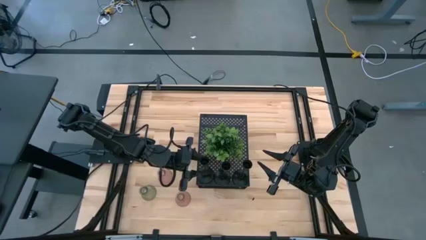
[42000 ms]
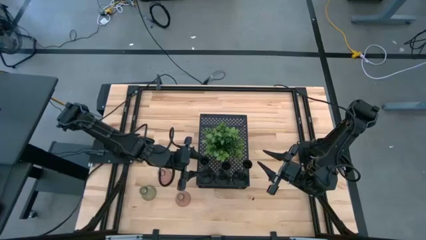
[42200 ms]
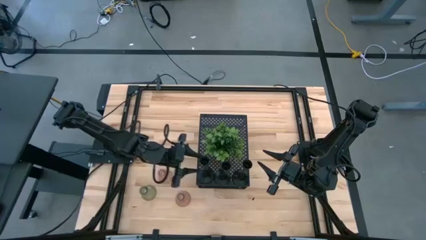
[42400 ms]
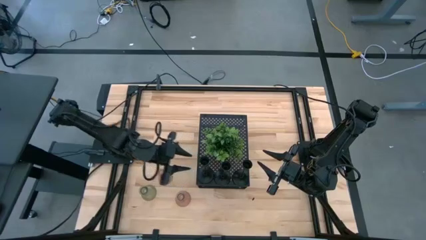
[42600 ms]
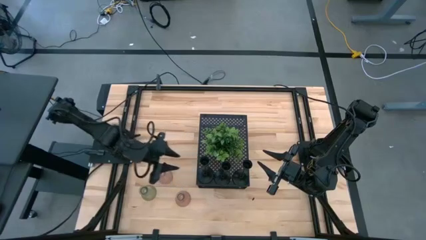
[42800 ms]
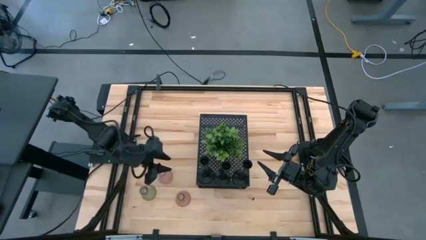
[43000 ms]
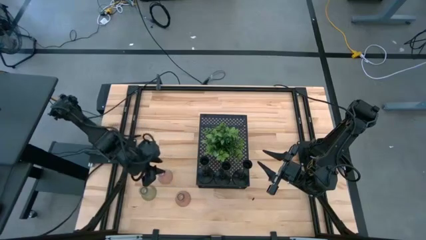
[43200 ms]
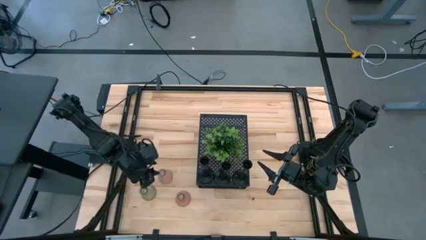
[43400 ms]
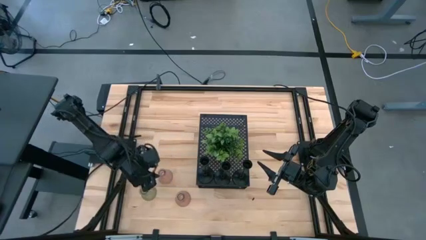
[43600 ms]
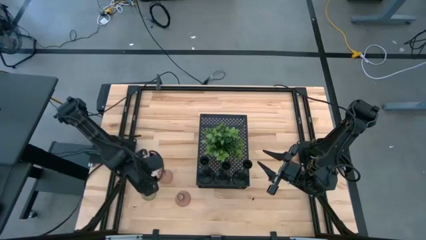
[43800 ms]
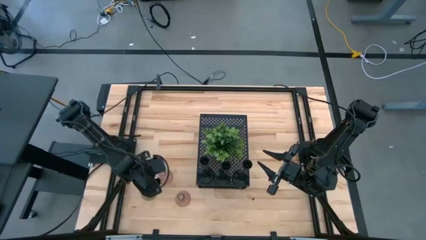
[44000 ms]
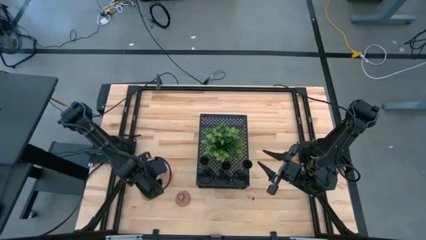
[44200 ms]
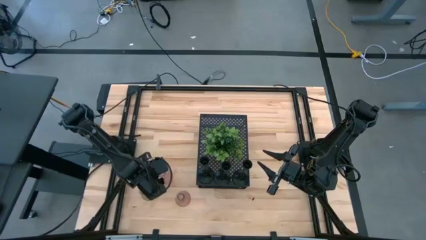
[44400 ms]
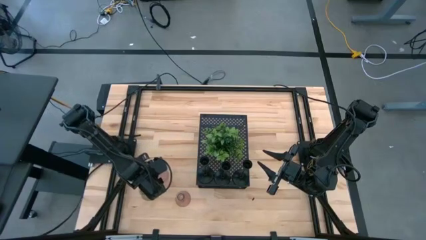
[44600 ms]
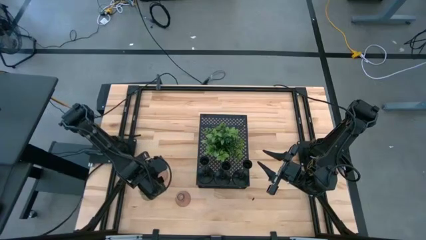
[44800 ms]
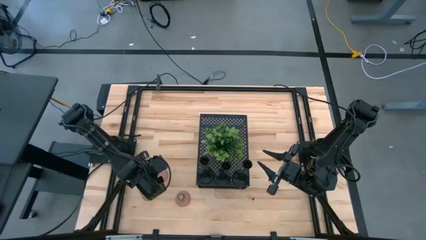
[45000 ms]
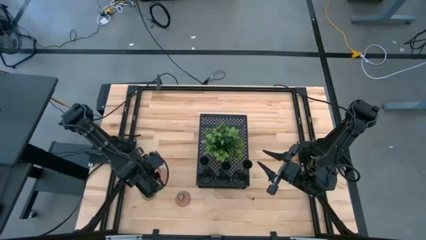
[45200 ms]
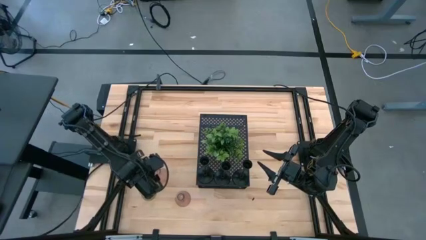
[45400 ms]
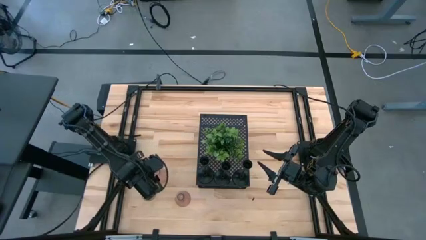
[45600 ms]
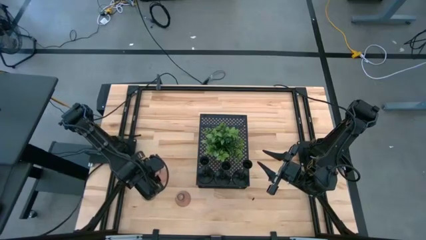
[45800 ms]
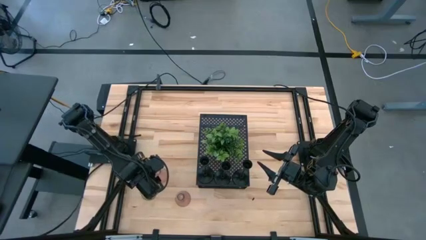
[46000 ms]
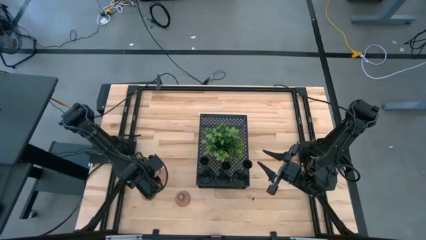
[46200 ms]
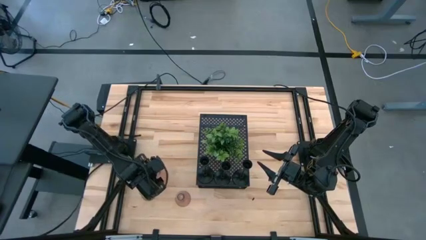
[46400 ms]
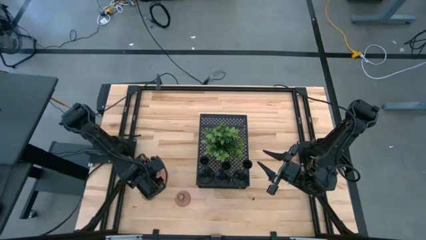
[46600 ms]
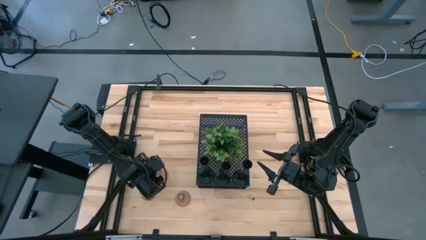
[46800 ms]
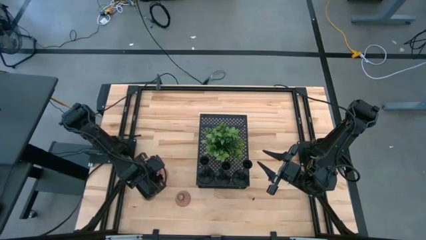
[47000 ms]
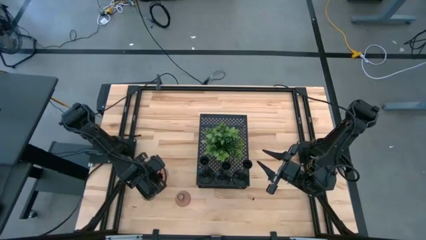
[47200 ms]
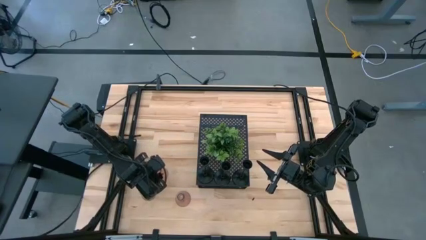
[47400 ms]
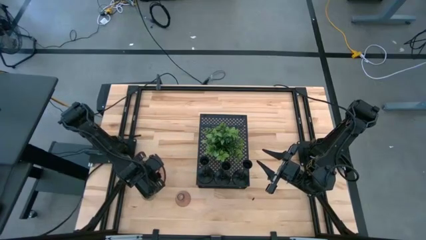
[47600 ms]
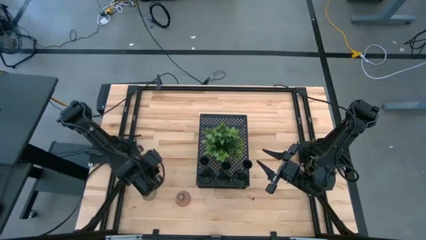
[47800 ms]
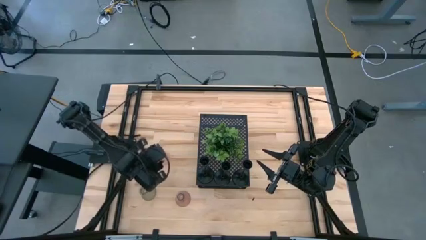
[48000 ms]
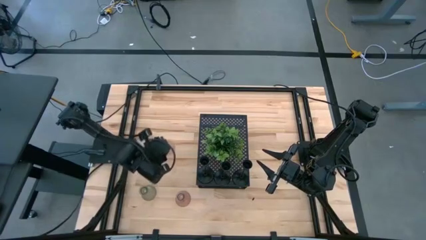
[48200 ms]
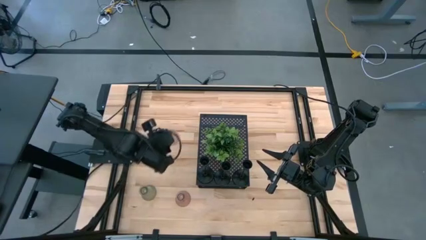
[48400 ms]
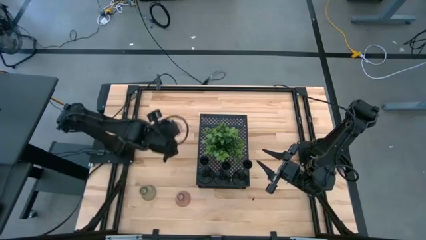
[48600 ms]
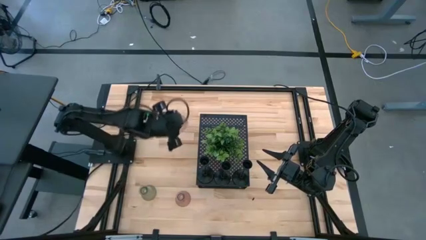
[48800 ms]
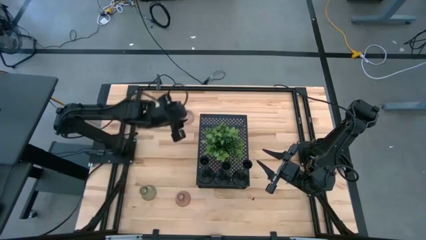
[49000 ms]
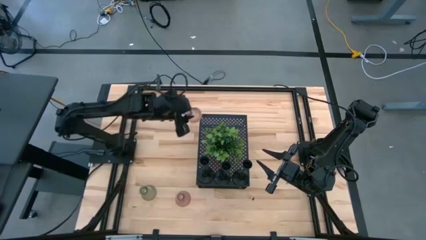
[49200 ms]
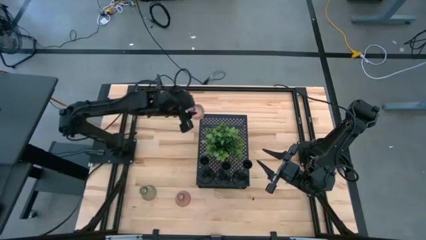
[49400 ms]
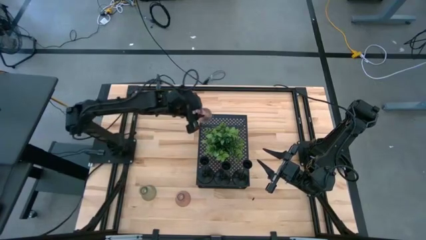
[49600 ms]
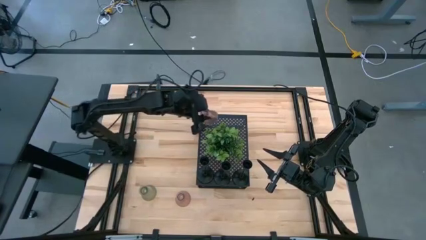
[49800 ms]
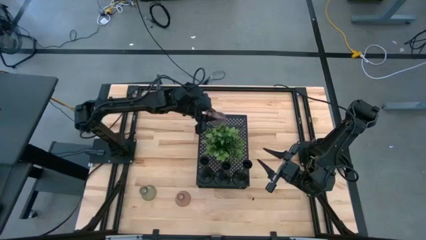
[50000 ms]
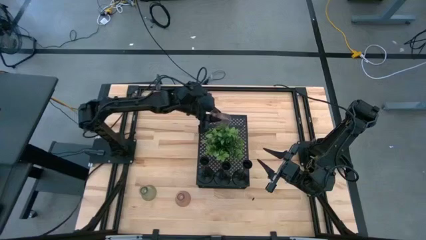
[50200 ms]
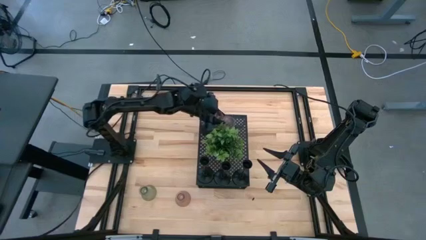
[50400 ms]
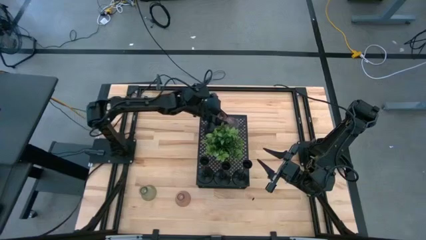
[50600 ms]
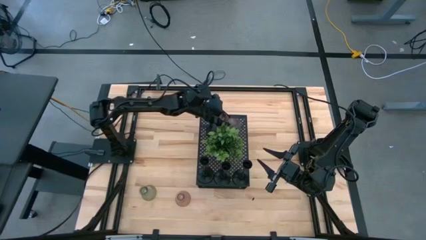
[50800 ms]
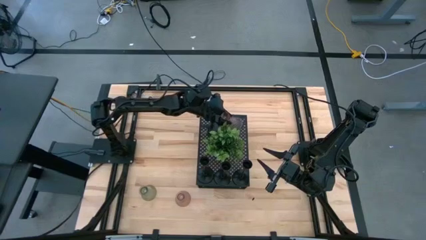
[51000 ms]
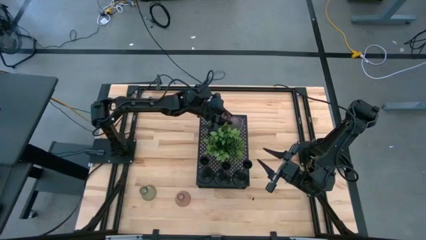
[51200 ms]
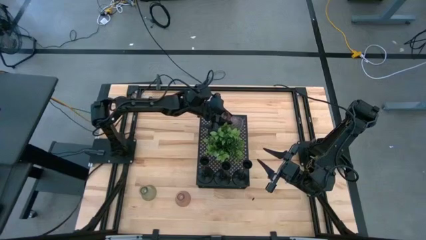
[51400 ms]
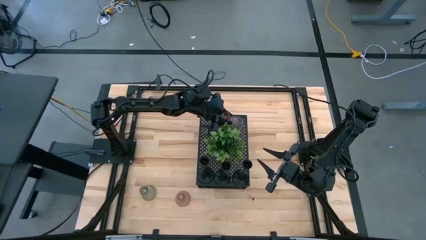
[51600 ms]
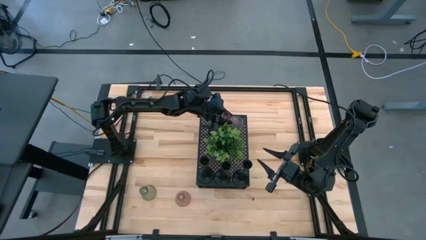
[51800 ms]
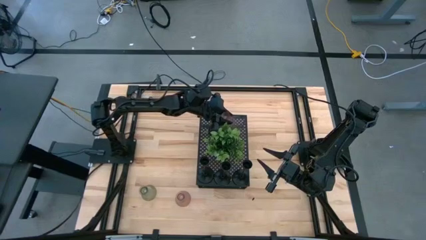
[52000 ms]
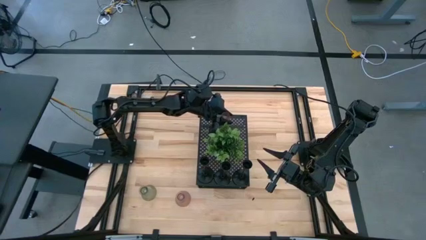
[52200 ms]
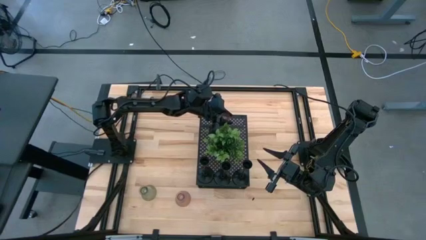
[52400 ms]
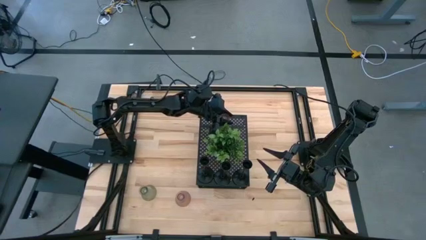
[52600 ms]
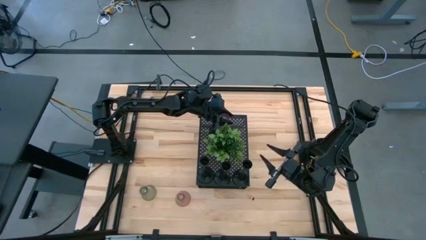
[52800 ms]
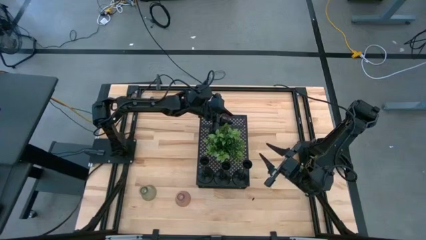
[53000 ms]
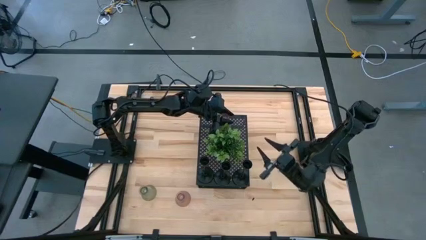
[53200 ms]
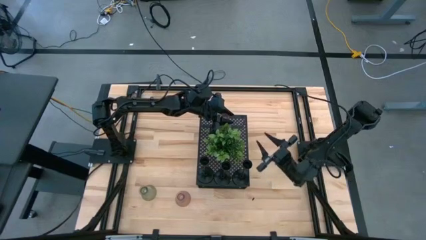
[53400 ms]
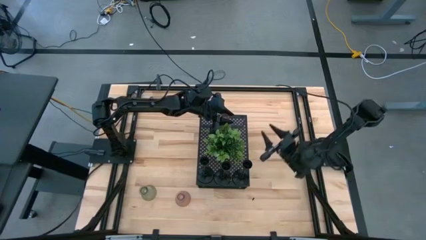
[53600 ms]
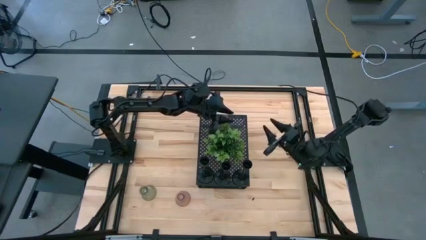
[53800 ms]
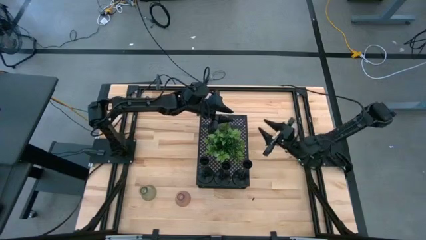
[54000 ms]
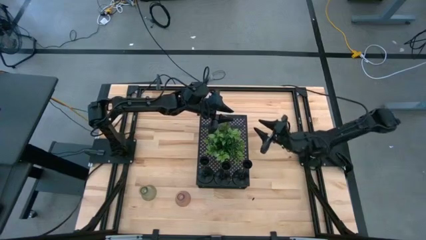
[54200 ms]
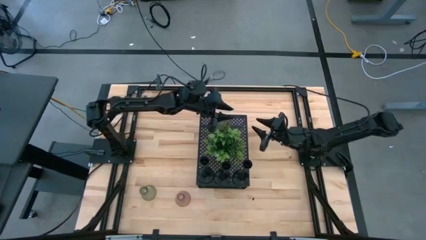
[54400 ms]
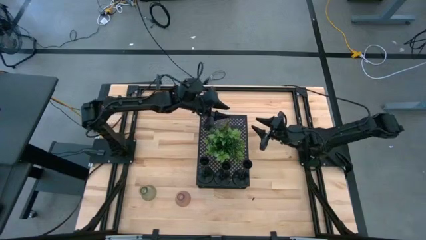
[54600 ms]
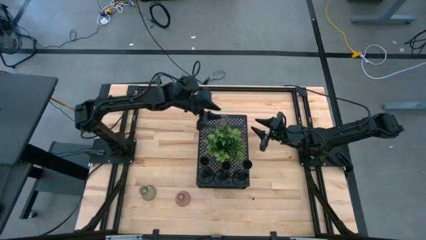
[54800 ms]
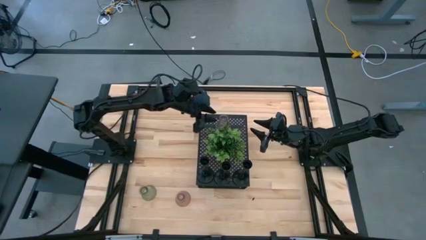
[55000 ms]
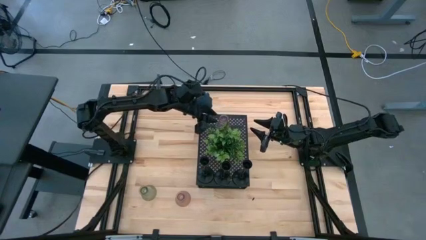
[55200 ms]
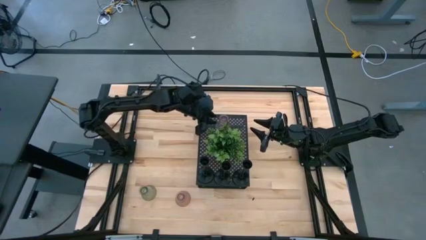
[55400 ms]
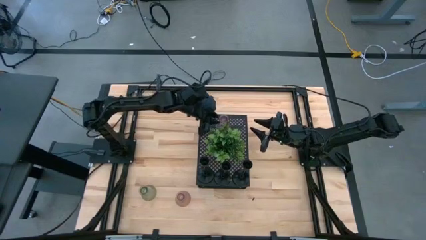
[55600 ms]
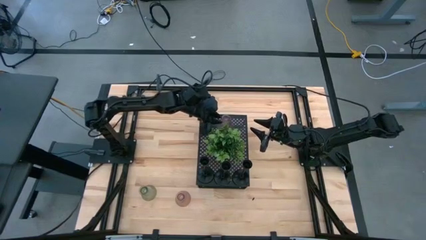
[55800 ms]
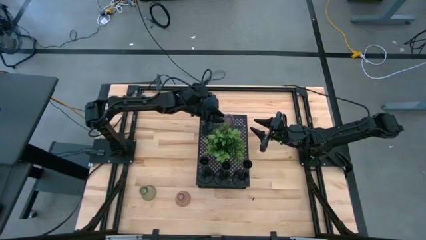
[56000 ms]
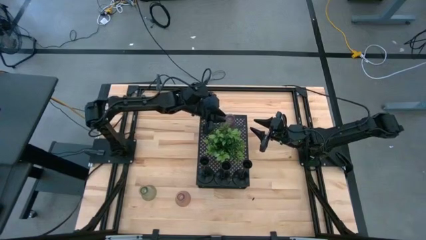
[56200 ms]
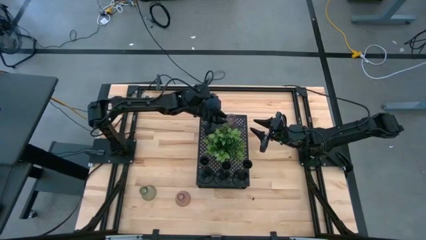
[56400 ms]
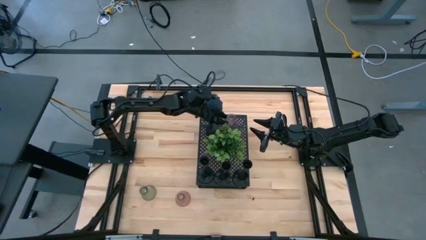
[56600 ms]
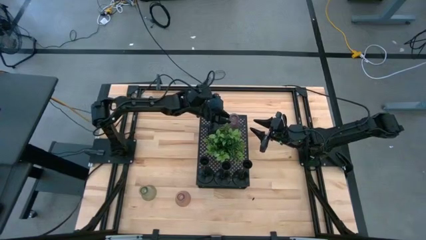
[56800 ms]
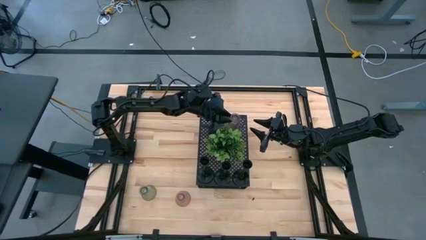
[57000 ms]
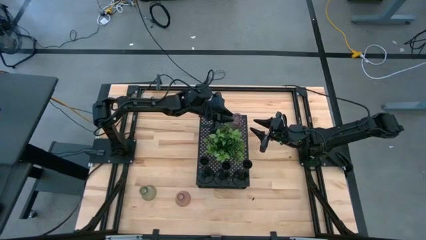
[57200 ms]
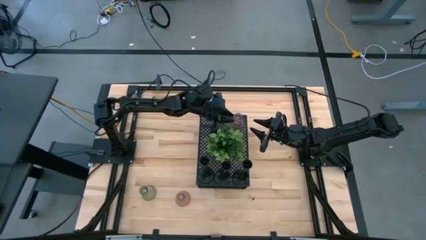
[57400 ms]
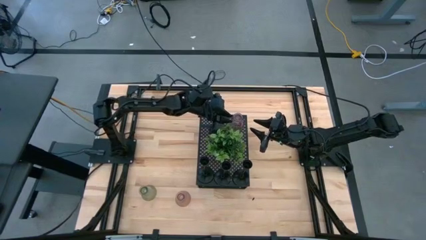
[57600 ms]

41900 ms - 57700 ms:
Task: Pick & Place candle stick holders
Put the left pink glass candle holder on the shelf

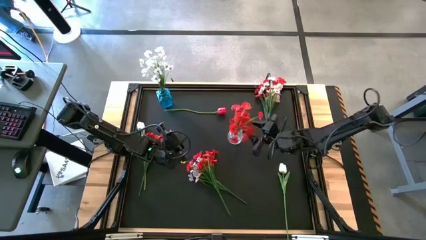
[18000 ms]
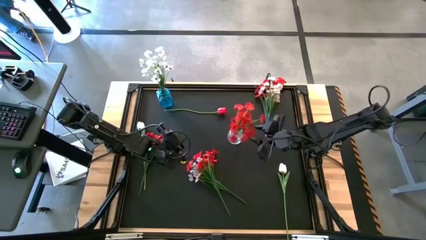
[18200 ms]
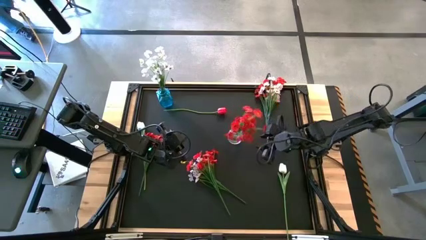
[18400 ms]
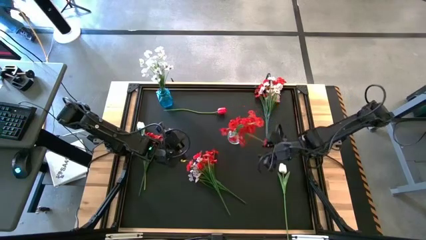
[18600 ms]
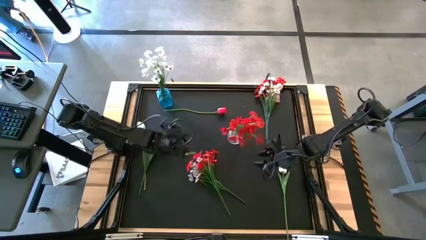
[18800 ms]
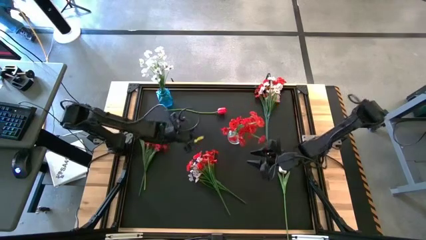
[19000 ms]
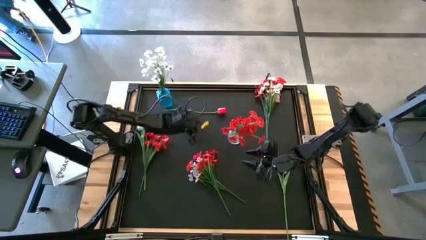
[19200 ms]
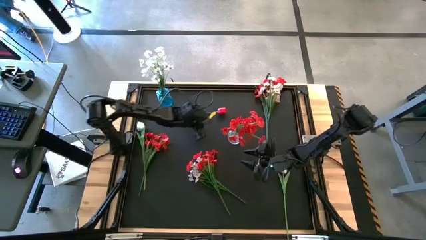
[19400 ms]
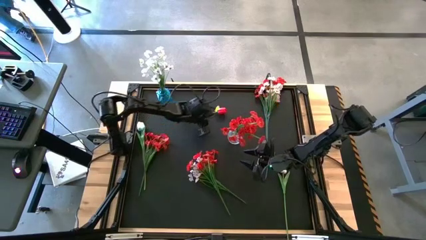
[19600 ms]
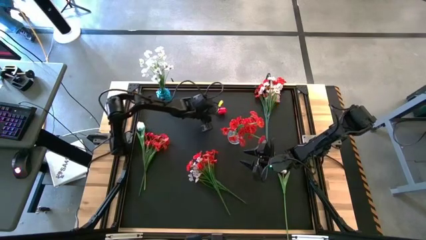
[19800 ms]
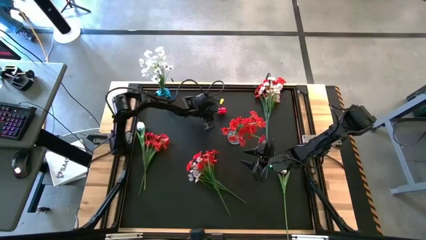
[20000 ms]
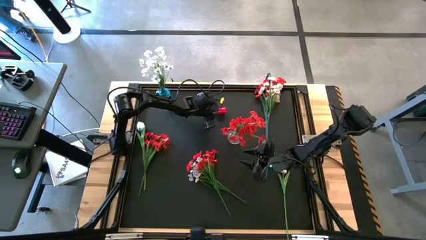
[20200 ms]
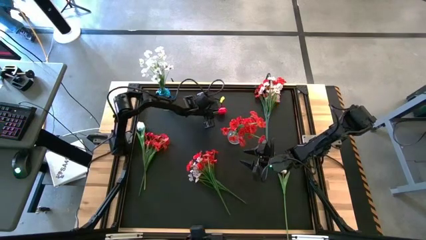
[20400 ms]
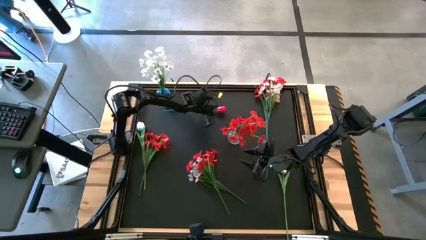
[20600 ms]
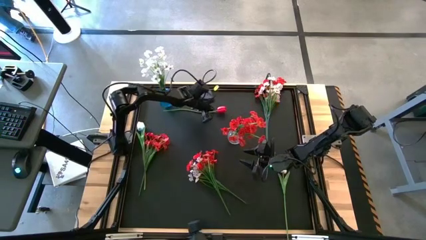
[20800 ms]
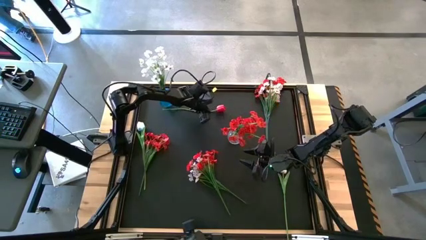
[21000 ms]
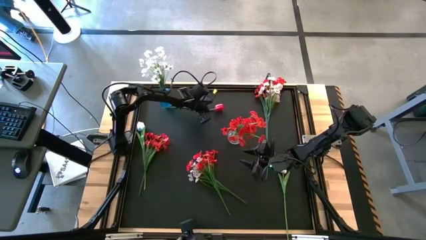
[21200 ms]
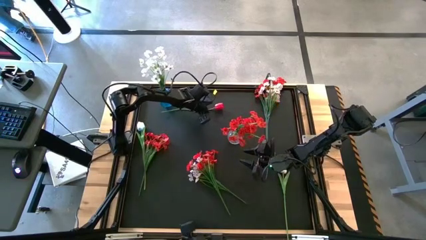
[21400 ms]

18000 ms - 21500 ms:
Task: Sort flowers into vase by color
Put the top left red flower into the transparent vase
